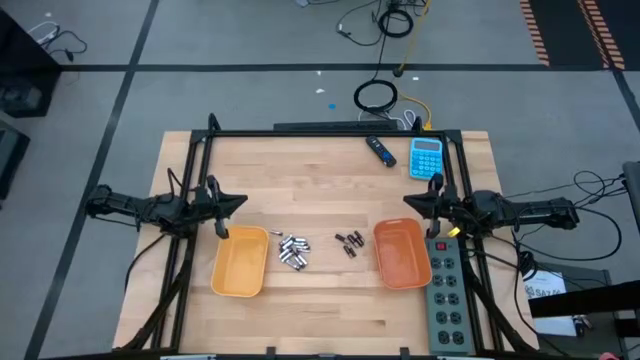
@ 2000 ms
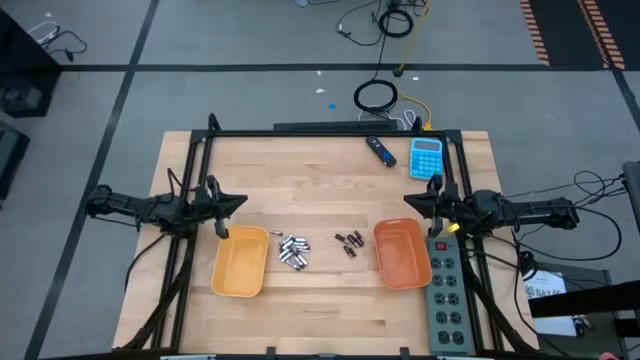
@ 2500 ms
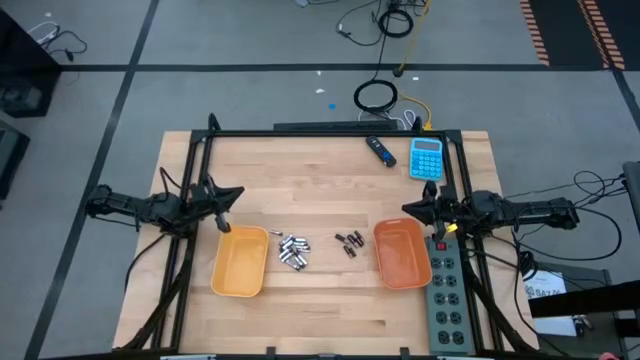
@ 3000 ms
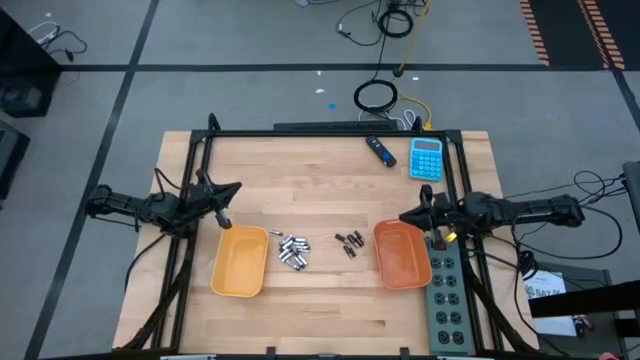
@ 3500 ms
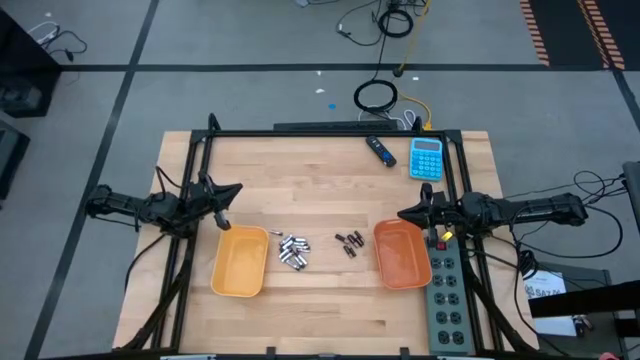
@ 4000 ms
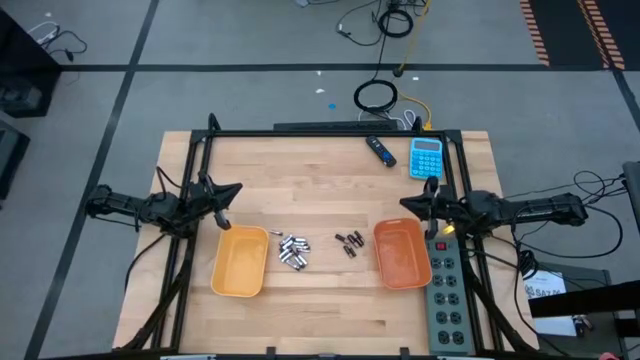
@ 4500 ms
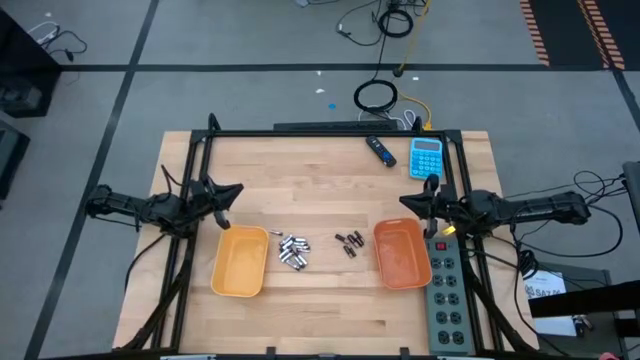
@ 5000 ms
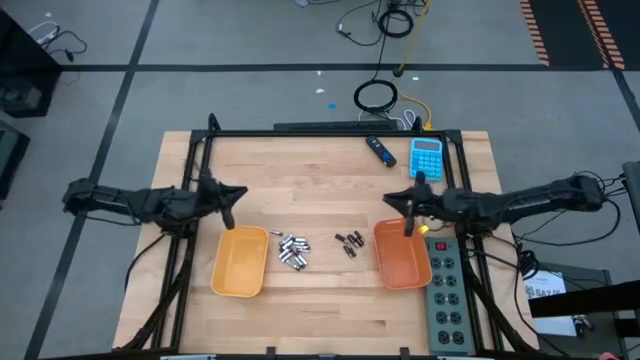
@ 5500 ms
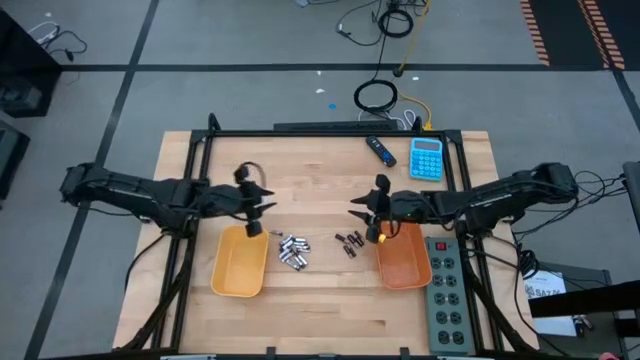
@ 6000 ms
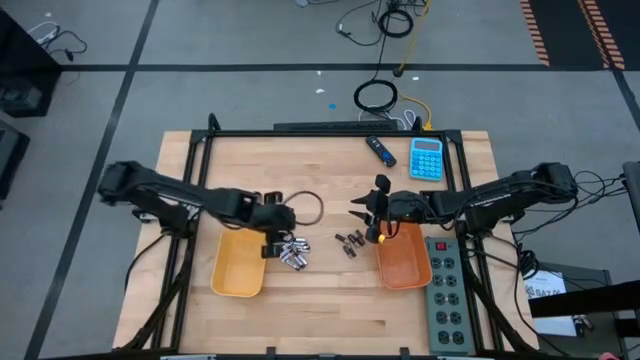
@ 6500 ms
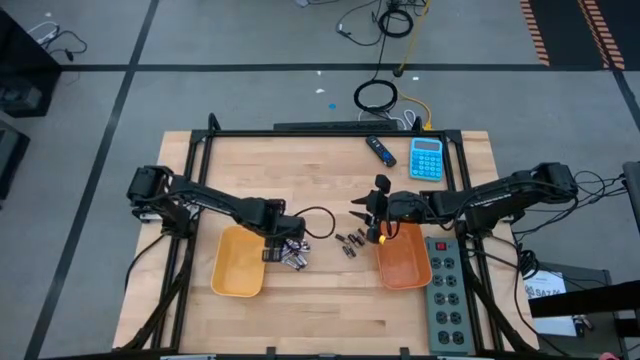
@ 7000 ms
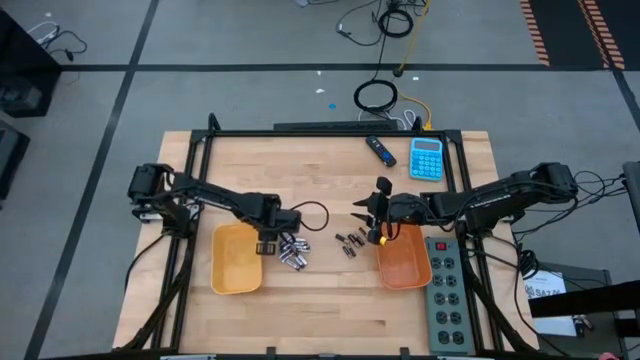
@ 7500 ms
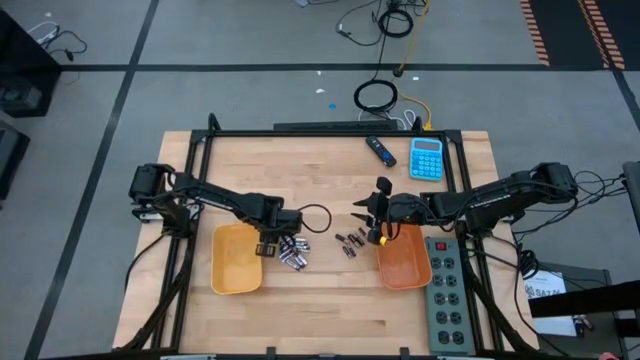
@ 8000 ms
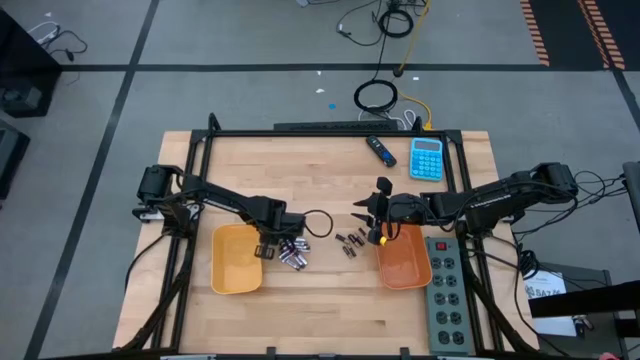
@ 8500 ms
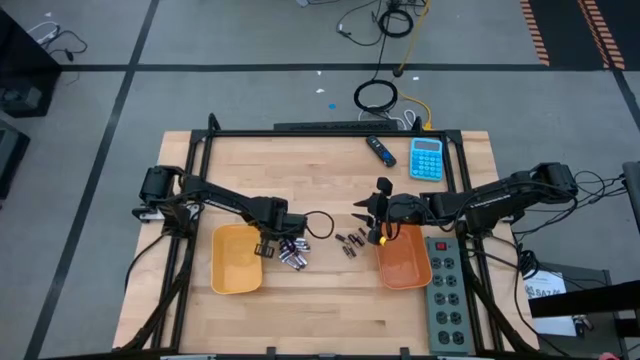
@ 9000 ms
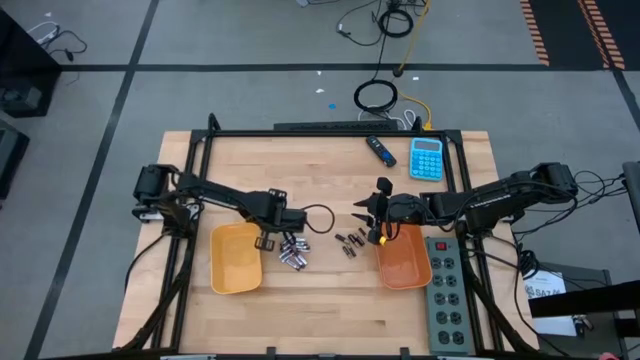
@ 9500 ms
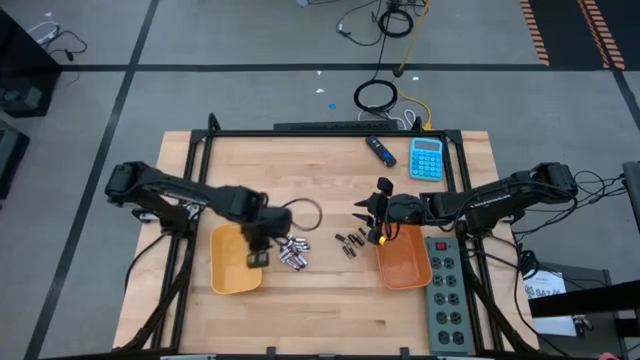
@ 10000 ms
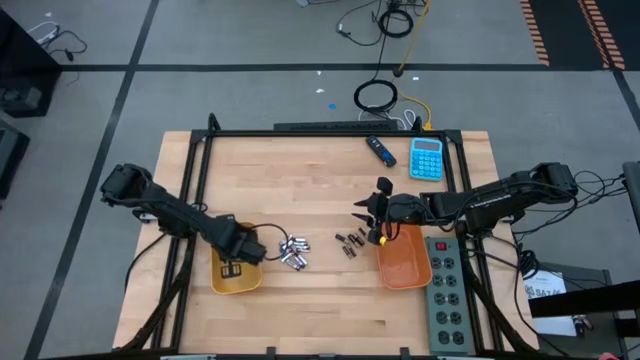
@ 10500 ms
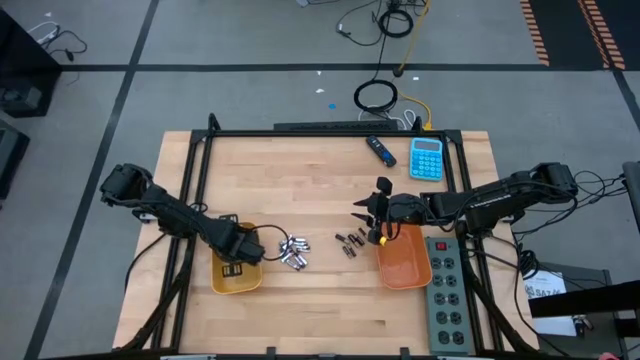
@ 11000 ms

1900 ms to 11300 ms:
Task: Sort batteries
Put the white battery into the yellow bin

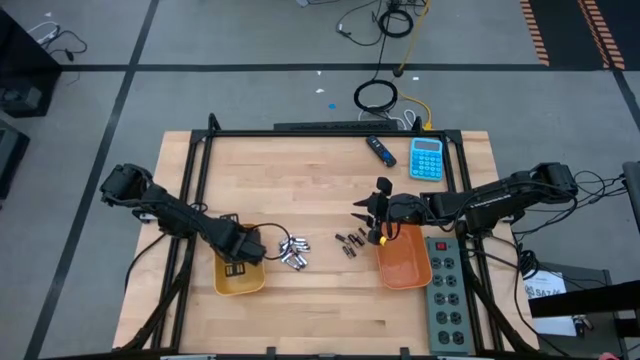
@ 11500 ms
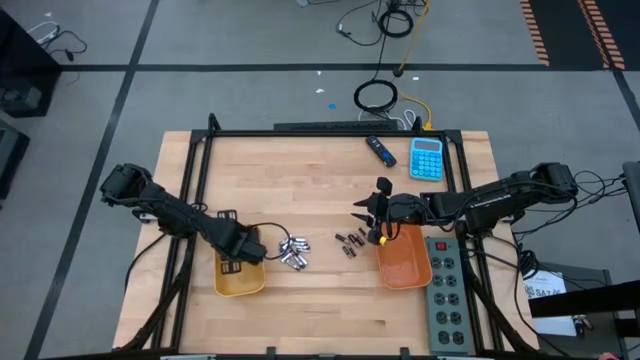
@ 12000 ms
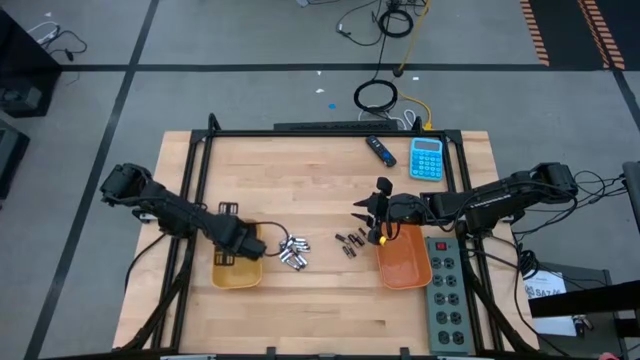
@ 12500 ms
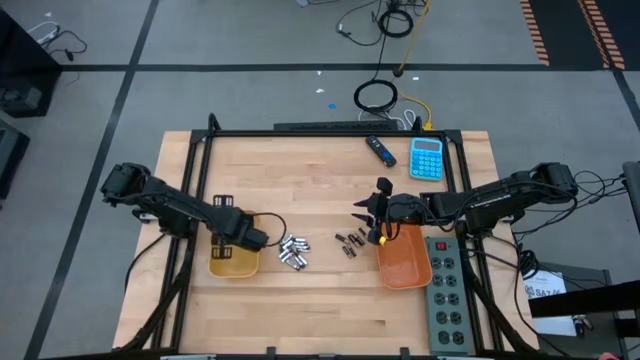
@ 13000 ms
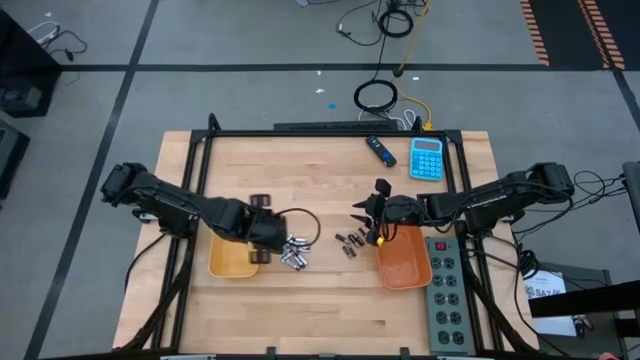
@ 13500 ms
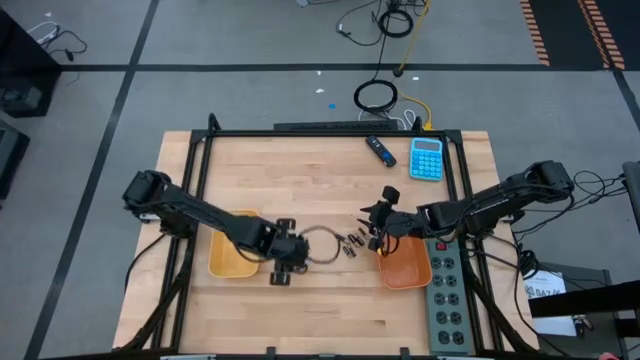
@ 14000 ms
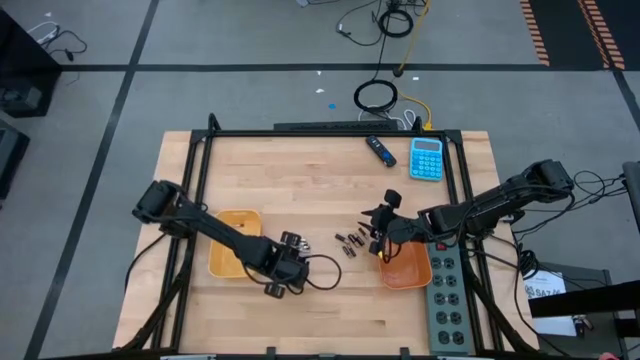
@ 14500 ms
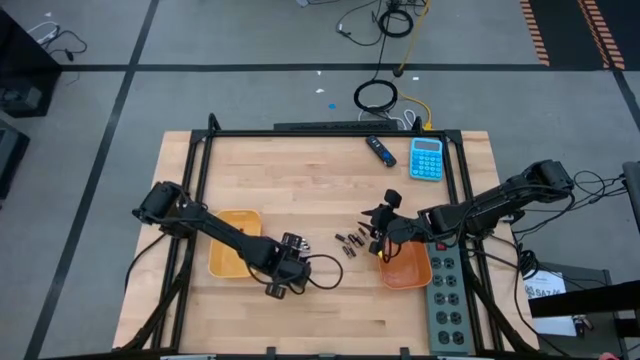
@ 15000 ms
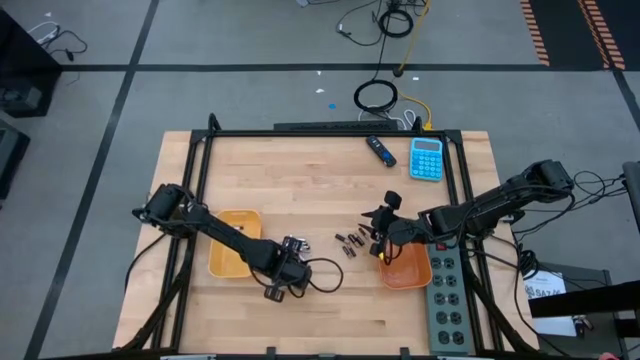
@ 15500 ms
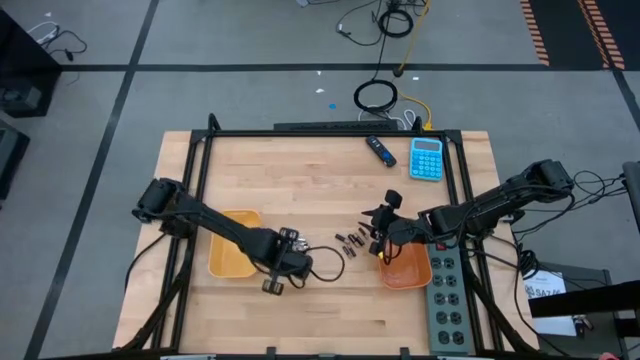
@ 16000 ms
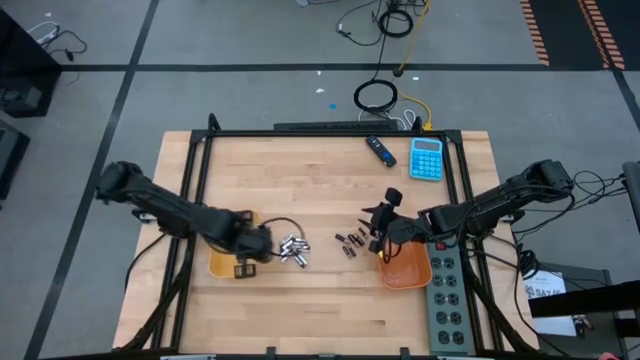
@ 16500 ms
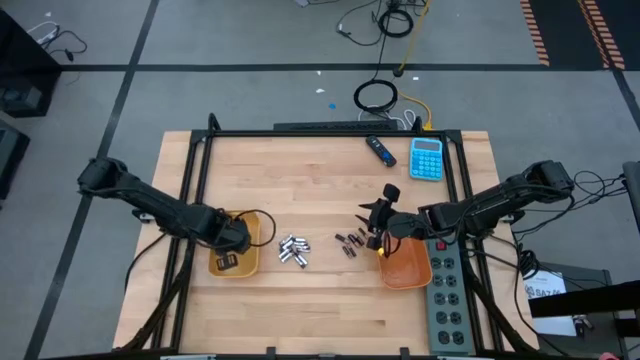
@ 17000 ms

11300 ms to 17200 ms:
Put the white battery into the yellow bin

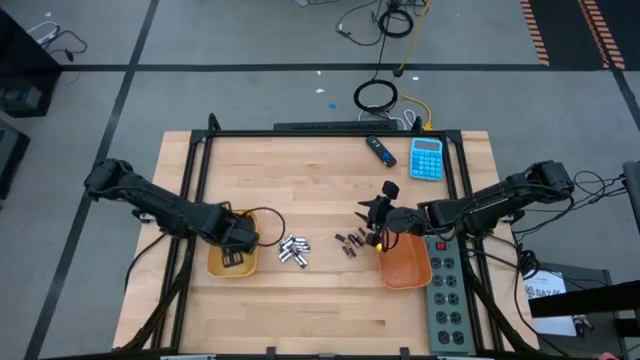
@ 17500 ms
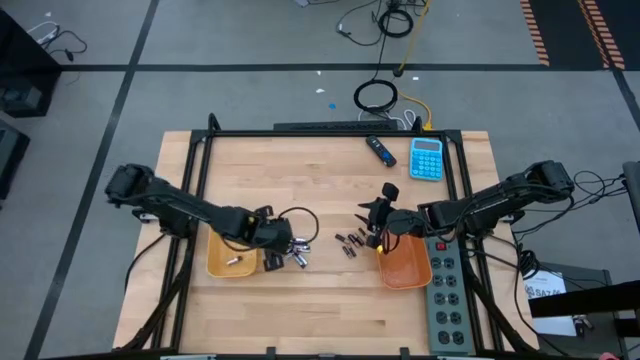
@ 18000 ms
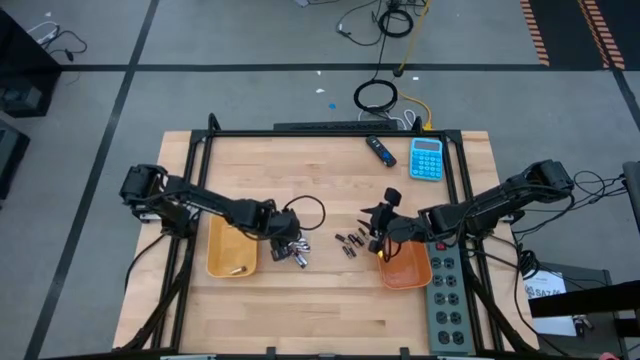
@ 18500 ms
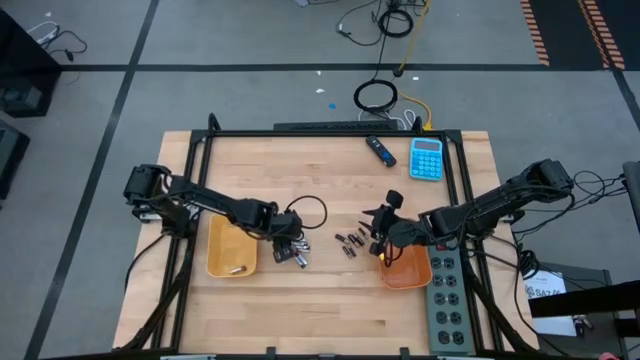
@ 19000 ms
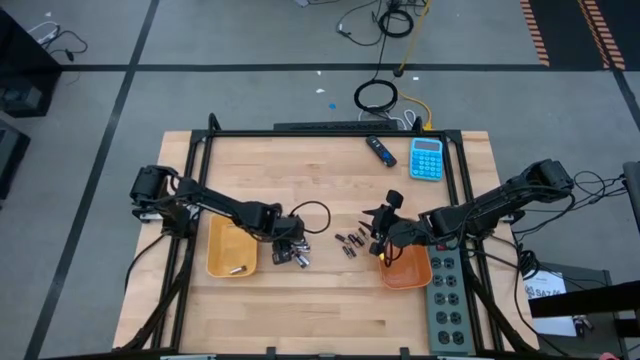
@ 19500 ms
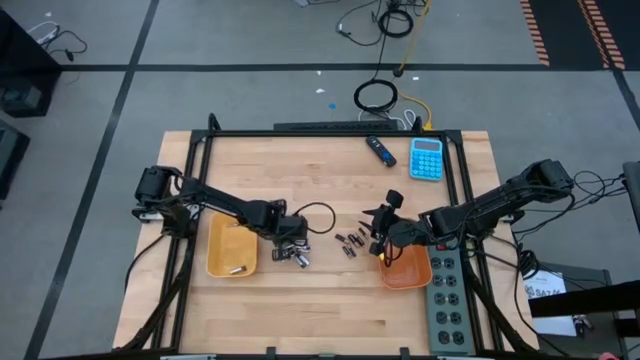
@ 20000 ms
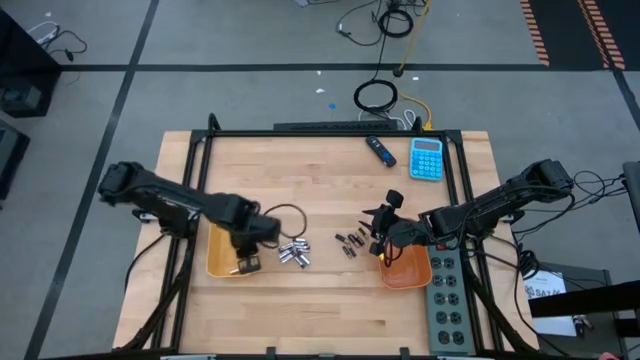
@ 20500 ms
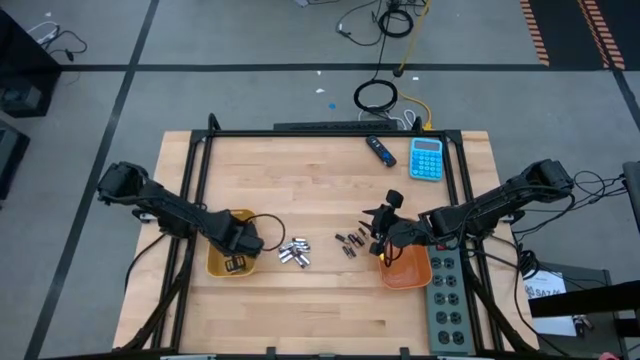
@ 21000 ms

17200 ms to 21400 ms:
Put the white battery into the yellow bin

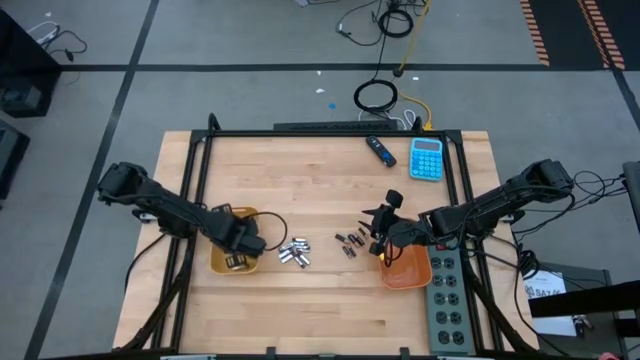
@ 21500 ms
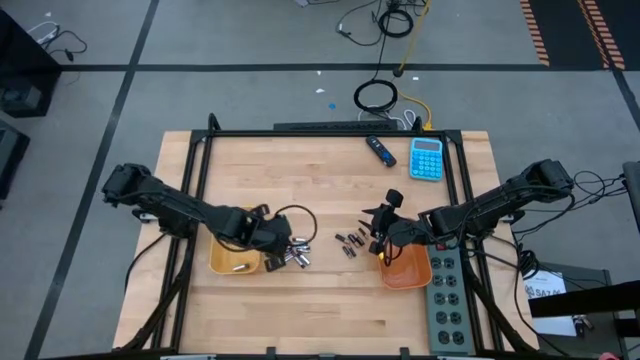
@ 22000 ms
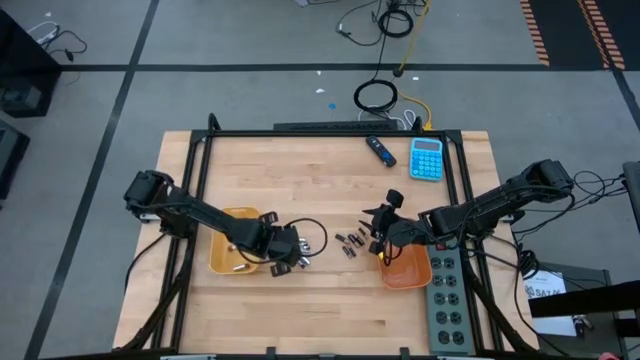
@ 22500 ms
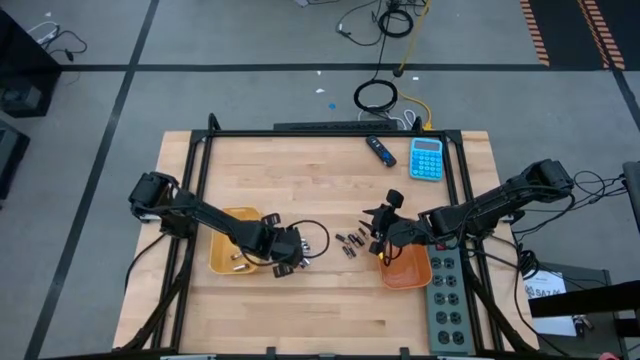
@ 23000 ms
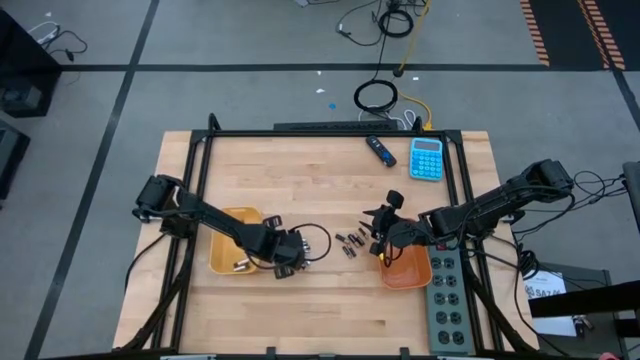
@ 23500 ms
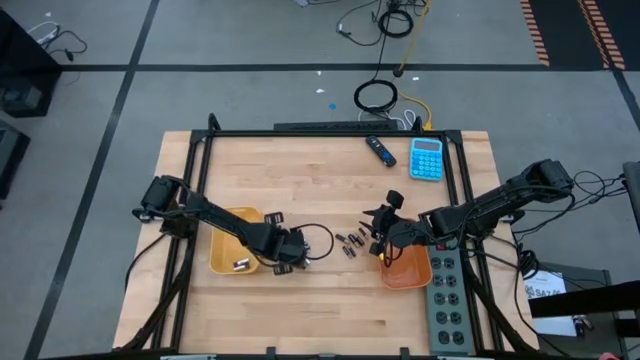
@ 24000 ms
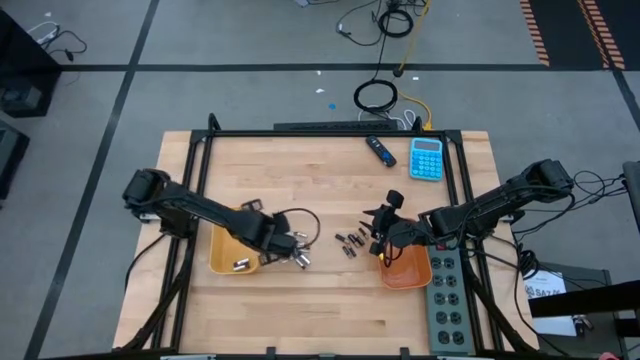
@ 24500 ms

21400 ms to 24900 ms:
Put the white battery into the yellow bin
